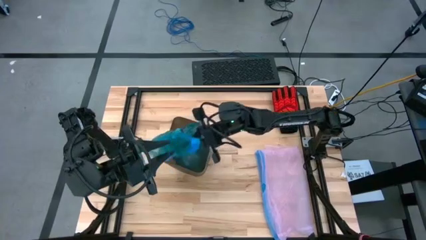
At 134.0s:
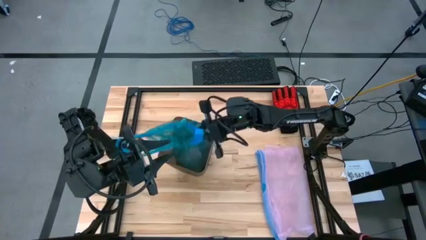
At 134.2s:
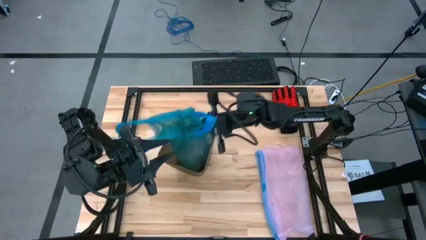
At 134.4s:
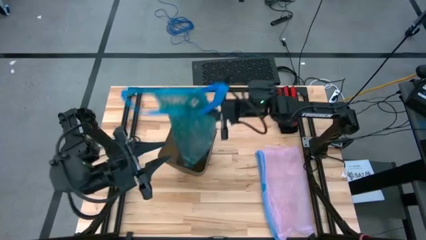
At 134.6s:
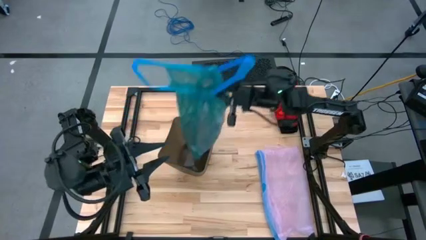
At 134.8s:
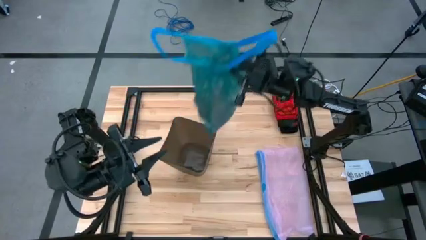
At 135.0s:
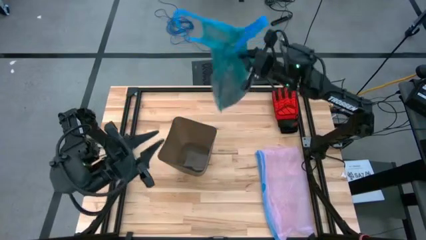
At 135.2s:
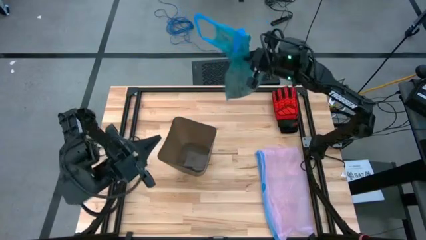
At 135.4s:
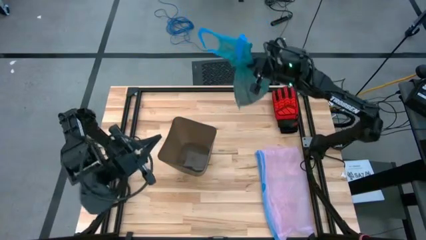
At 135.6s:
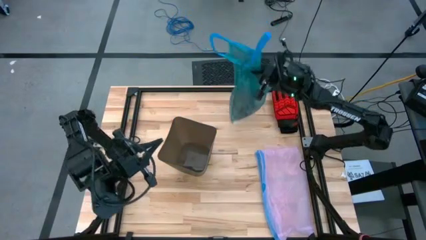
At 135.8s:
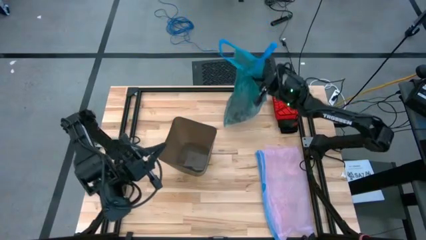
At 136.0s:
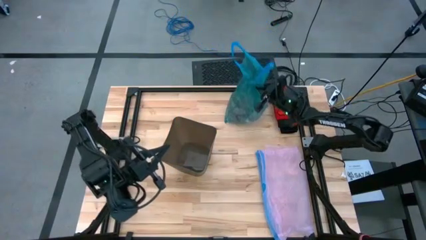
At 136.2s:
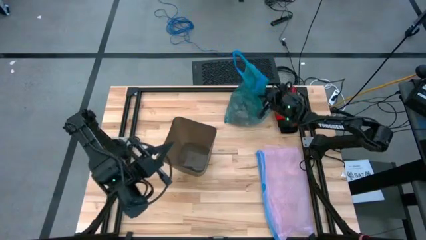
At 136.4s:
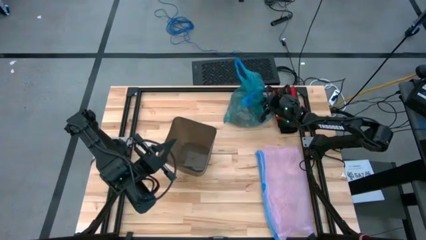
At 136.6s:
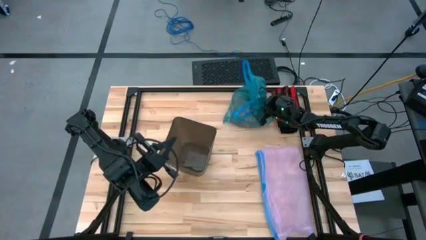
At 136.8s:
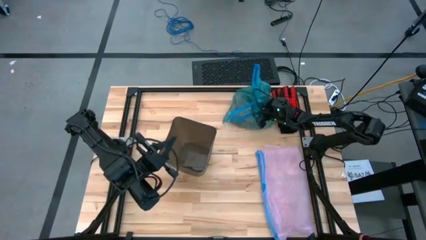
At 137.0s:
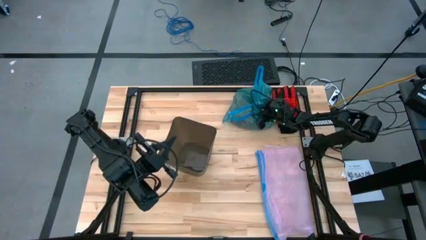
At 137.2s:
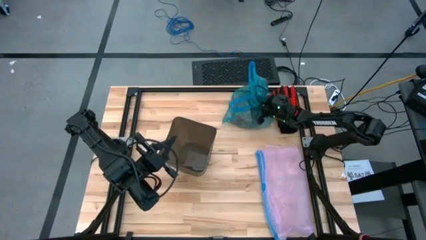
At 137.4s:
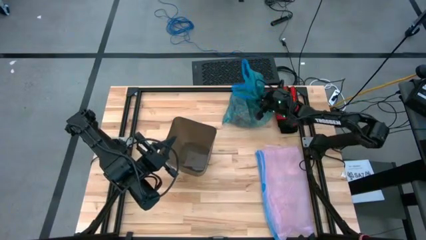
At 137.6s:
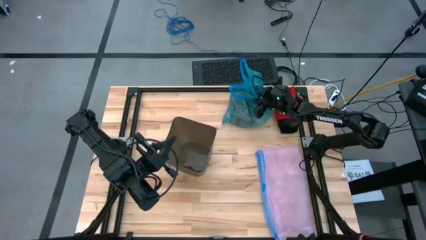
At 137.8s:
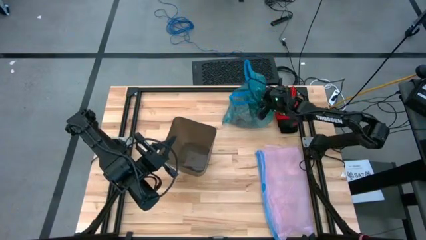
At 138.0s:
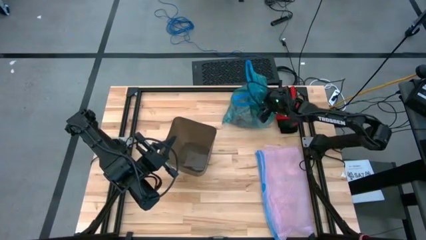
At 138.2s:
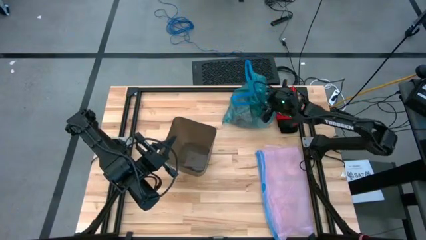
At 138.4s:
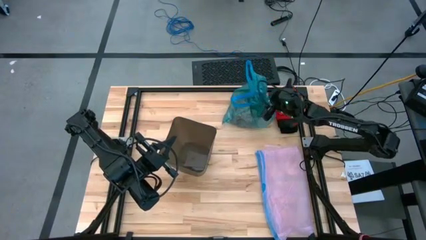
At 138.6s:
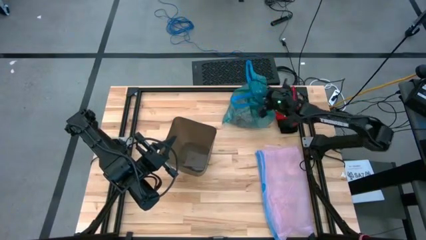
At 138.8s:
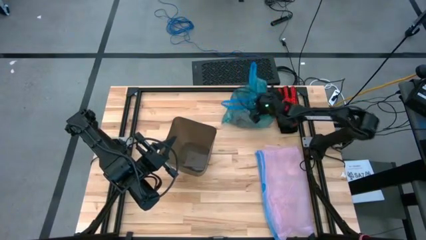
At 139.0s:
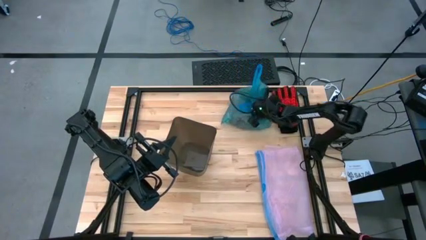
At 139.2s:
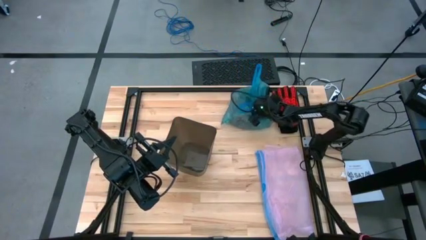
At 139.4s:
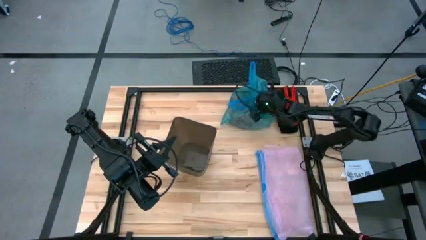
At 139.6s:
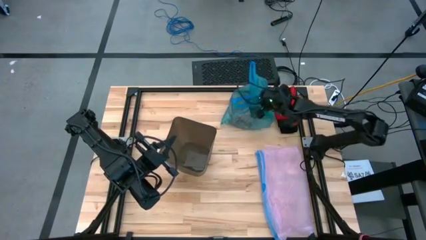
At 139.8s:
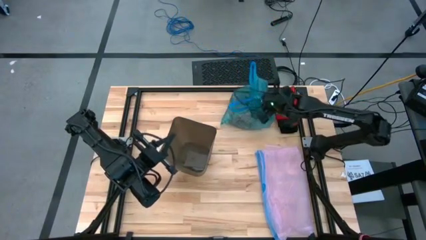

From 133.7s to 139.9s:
Task: place trash/remove bag and relplace
Remove the blue trash bag from the black trash bin

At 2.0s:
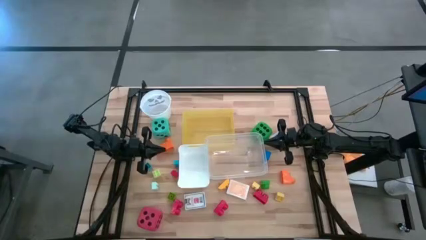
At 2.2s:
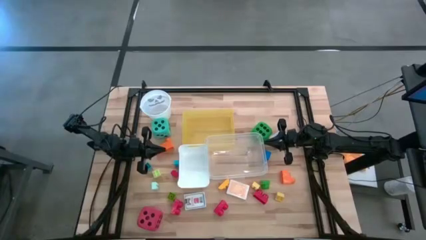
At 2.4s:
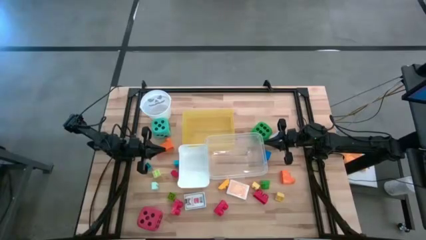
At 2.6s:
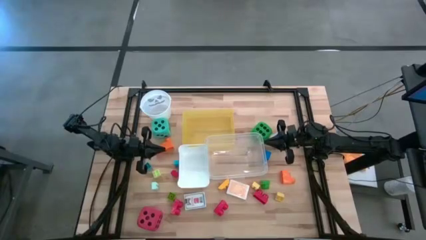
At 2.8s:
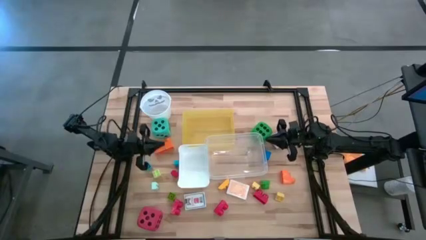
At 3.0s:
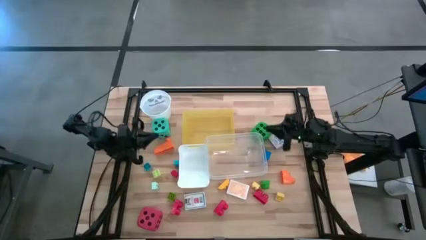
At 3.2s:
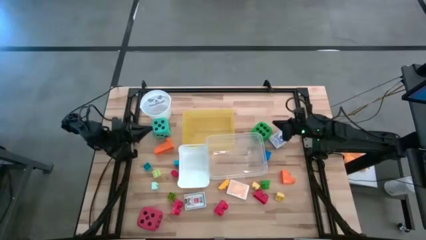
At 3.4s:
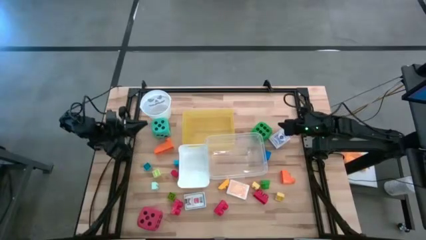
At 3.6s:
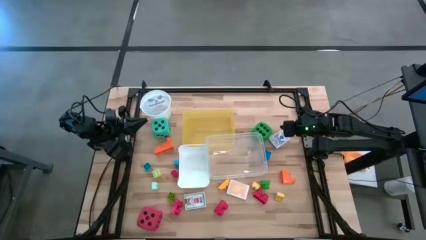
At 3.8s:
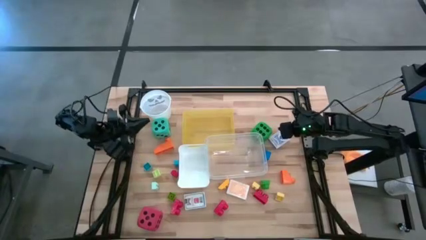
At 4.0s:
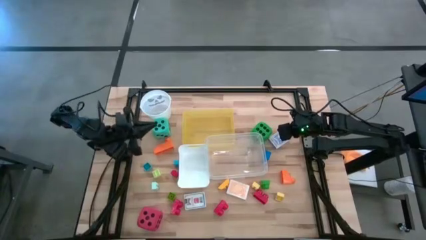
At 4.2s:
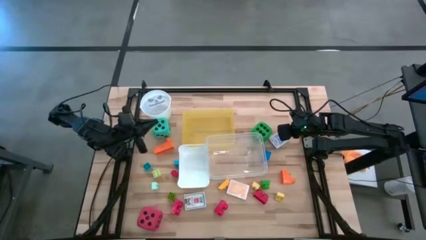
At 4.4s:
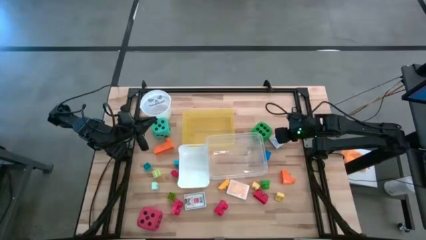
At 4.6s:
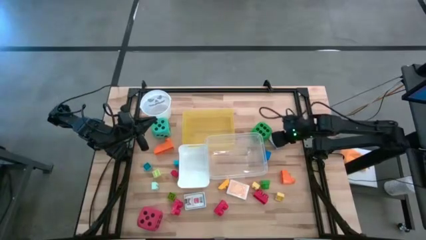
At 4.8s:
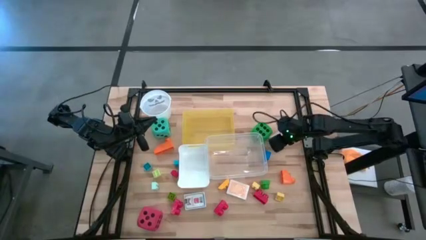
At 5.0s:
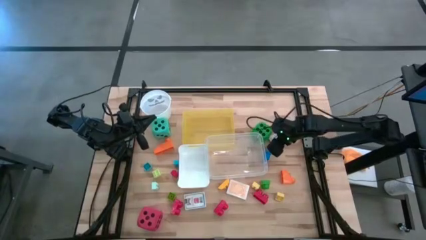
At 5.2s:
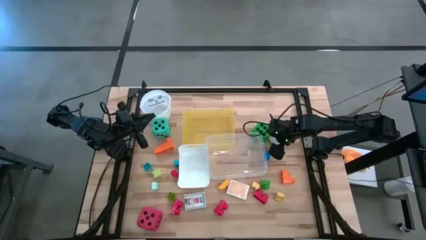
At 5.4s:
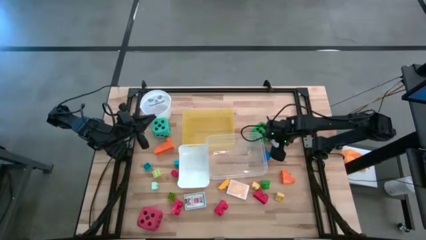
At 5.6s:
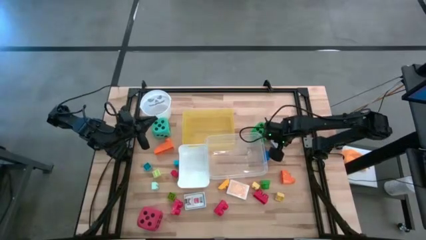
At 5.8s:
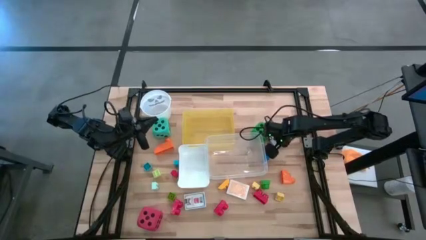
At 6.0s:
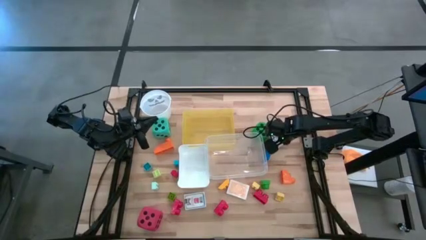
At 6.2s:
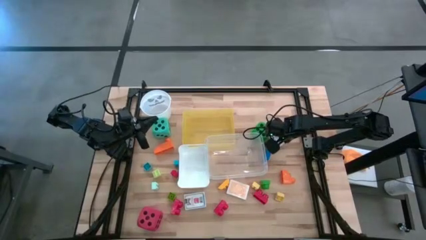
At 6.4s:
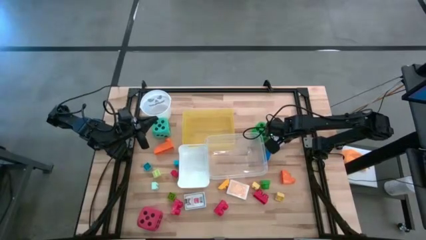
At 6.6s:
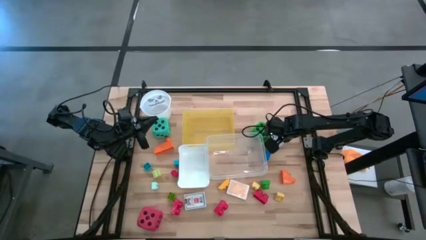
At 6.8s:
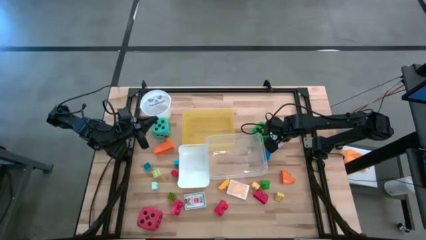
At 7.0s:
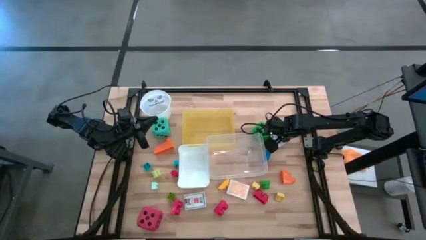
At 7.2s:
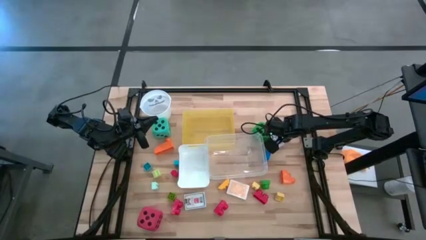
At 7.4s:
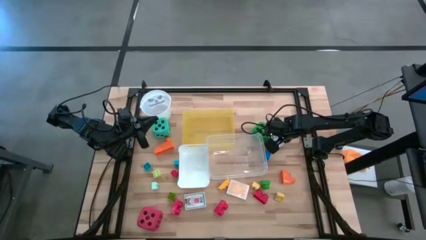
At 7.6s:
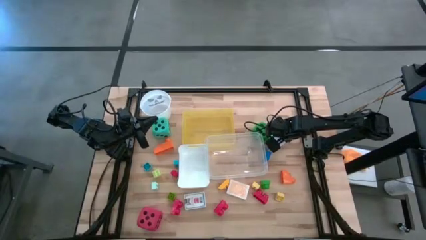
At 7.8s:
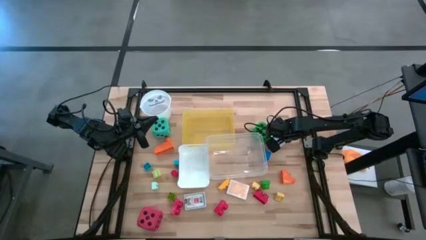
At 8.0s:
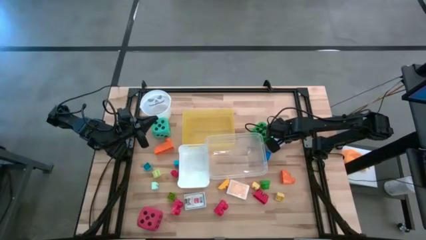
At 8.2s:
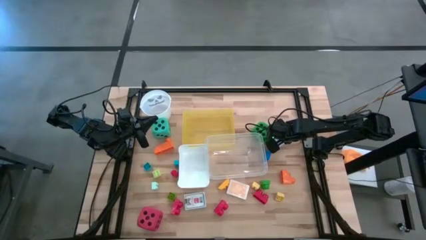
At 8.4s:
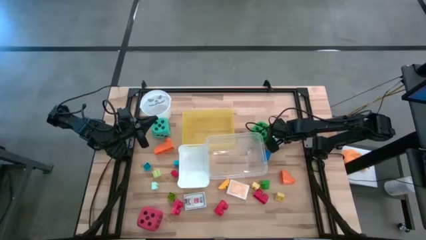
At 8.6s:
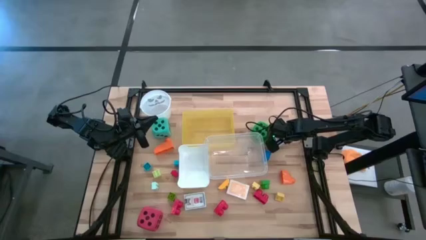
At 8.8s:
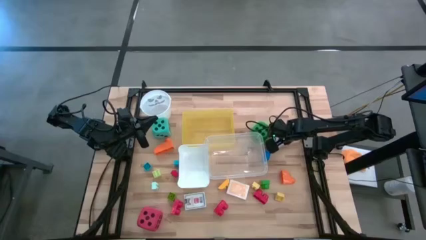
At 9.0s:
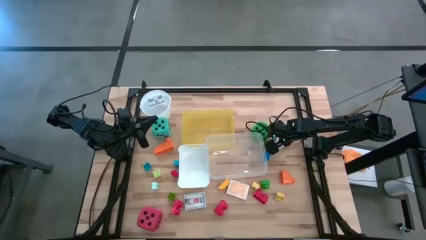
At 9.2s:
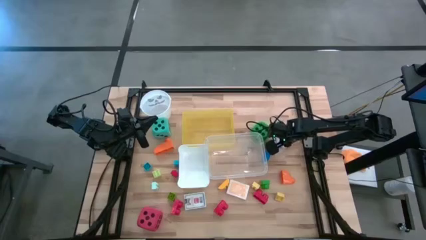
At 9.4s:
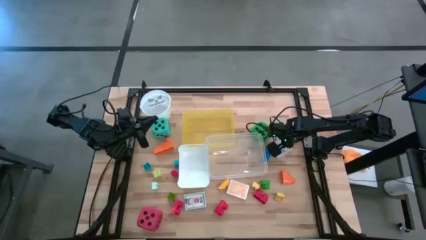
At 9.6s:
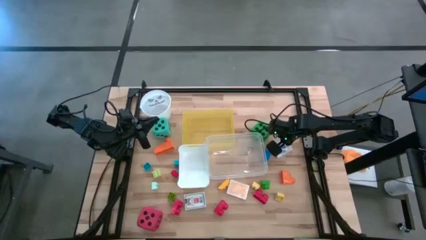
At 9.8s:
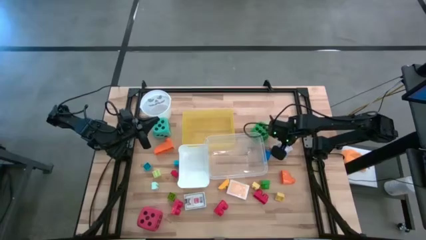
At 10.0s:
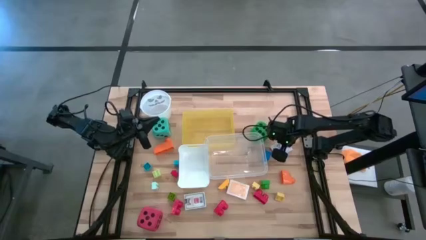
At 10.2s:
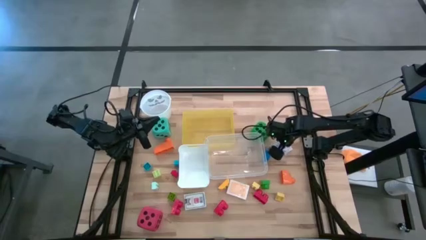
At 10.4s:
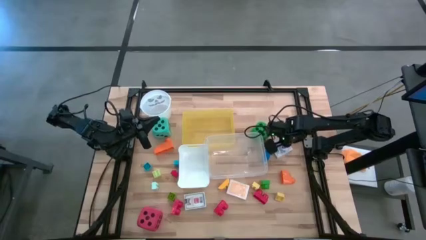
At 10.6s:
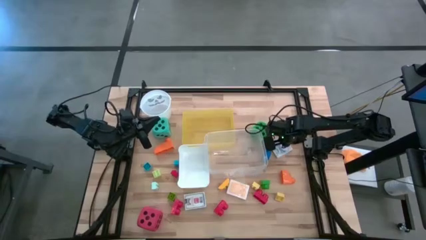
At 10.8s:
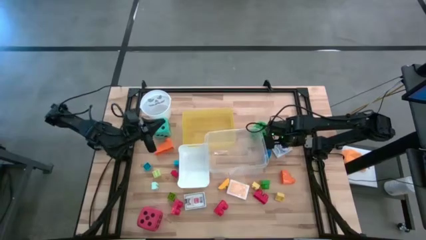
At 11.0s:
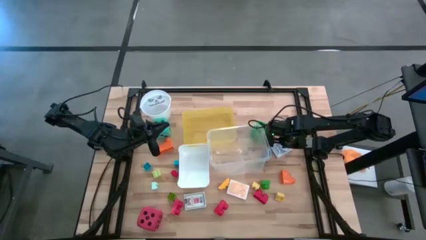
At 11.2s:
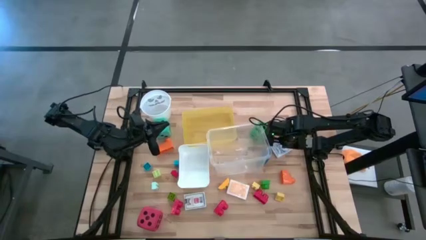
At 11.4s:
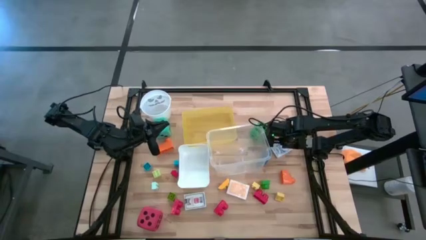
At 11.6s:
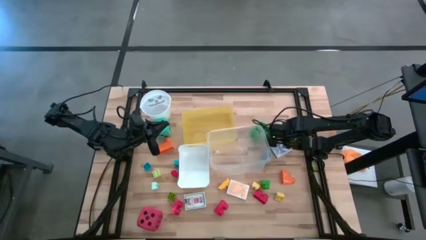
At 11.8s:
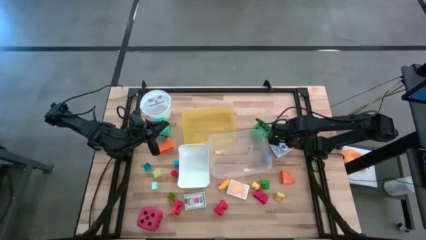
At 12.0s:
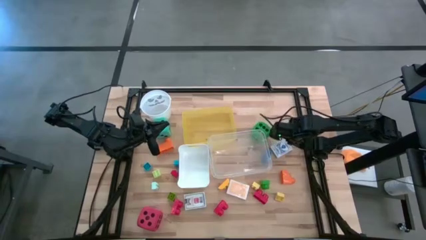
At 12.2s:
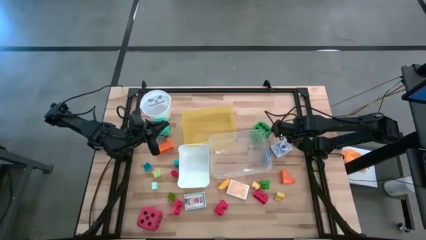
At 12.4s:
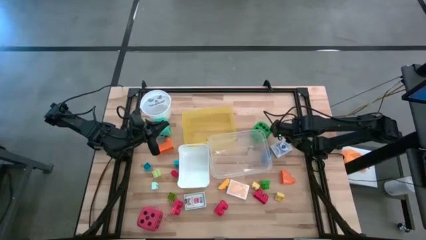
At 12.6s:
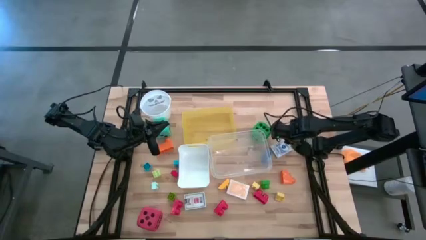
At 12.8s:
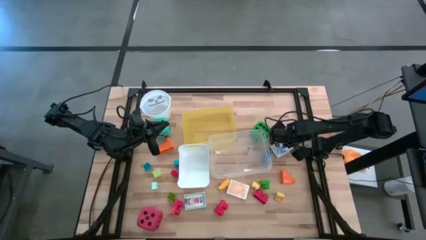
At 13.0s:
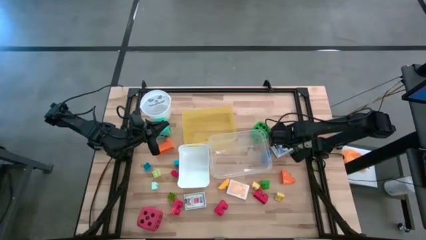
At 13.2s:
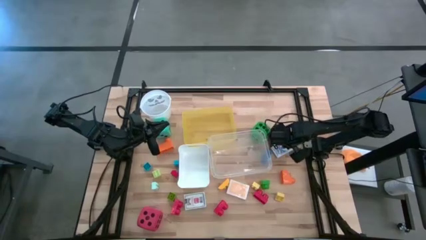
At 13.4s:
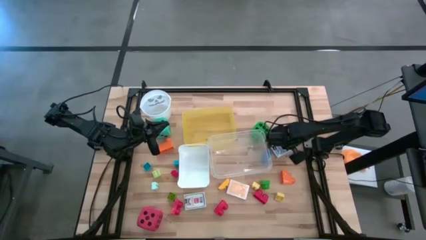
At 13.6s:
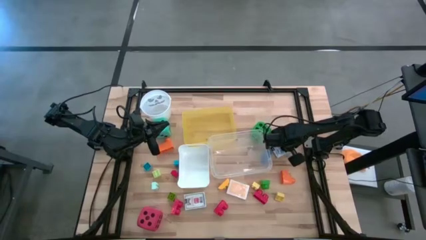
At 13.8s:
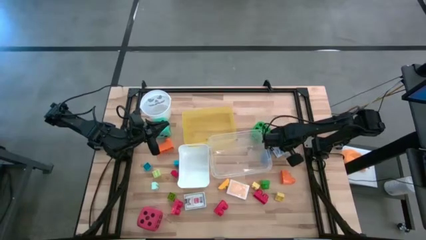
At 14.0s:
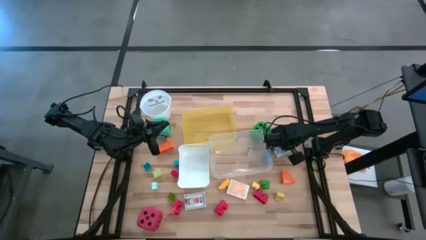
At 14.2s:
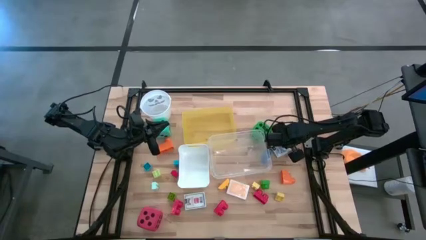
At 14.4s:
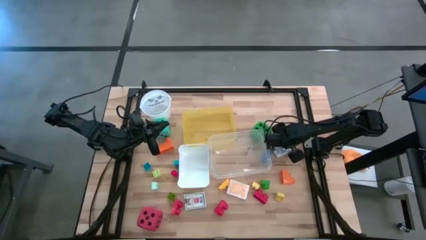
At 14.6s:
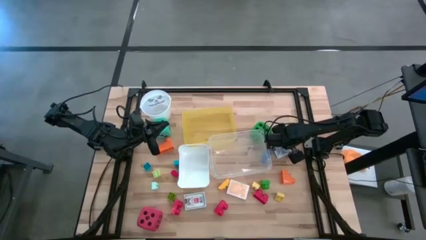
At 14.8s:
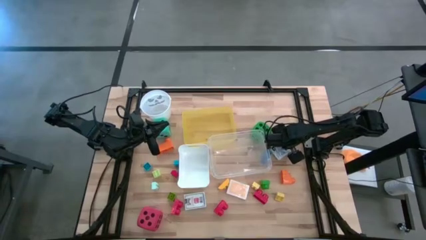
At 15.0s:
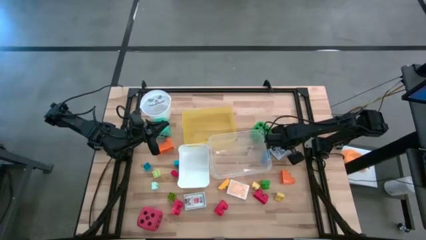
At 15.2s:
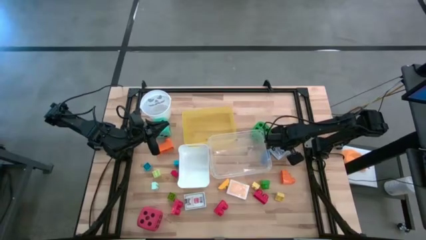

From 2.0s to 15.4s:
Task: Pick & Place Toys
Put the blue game card pack into the transparent bin
